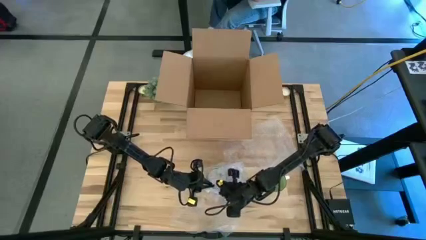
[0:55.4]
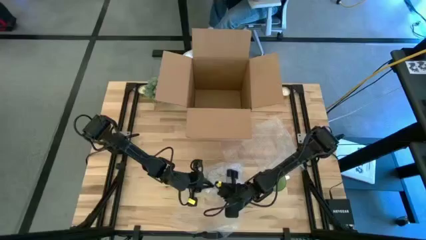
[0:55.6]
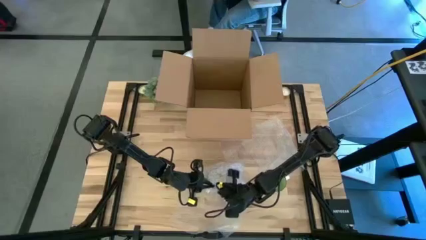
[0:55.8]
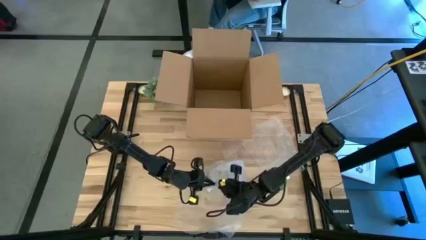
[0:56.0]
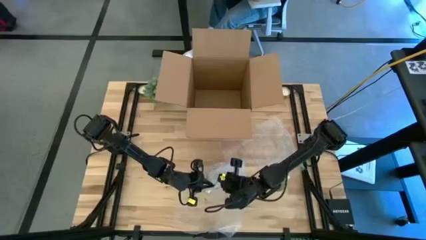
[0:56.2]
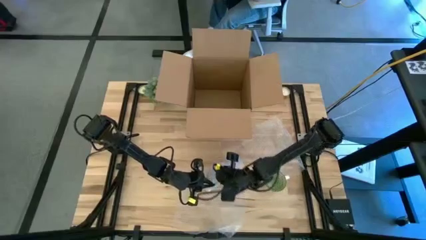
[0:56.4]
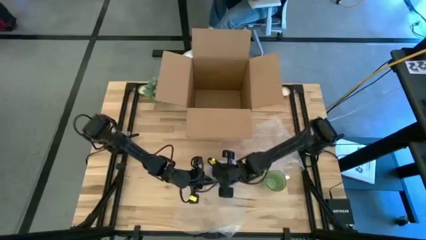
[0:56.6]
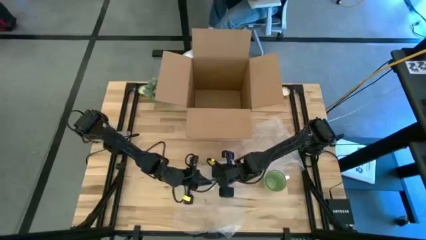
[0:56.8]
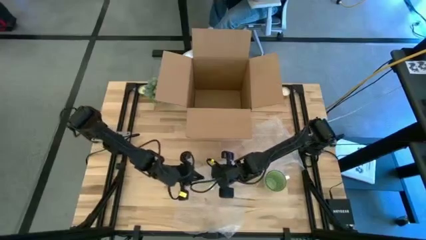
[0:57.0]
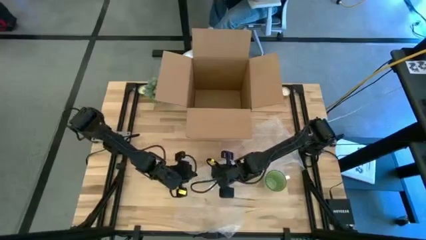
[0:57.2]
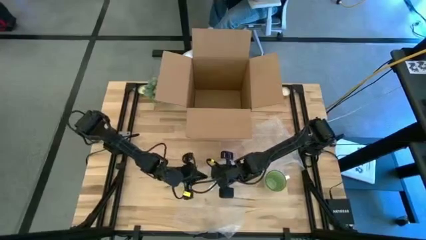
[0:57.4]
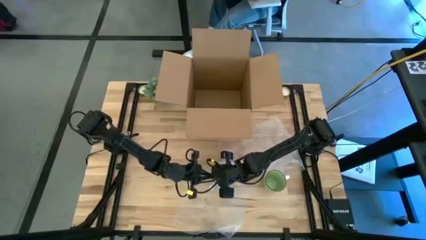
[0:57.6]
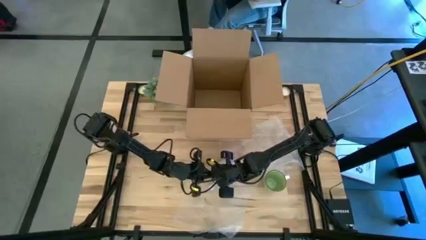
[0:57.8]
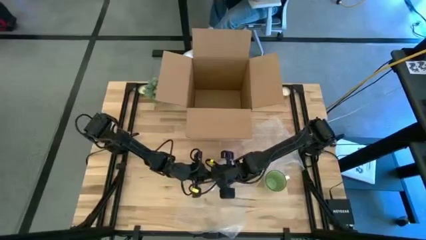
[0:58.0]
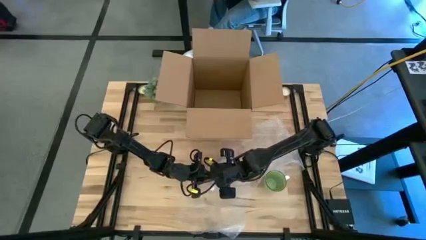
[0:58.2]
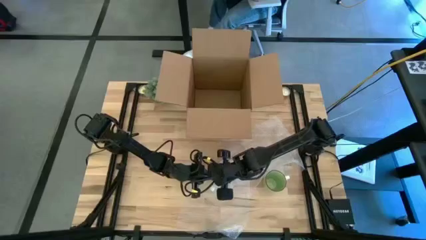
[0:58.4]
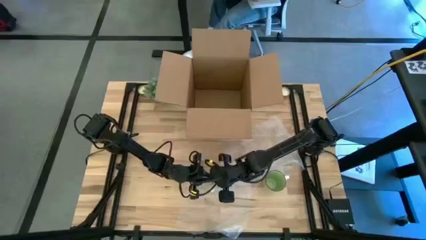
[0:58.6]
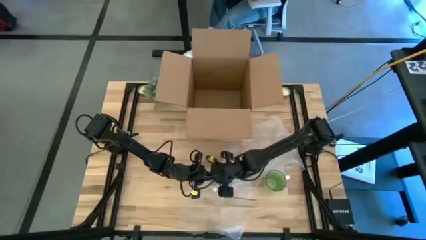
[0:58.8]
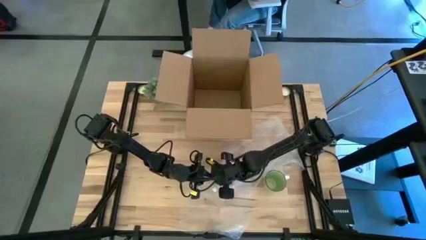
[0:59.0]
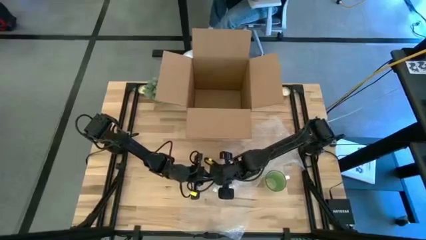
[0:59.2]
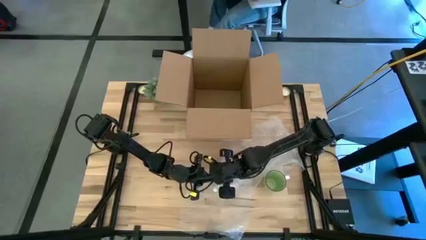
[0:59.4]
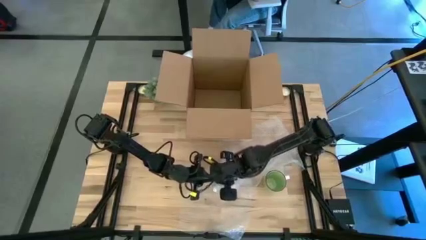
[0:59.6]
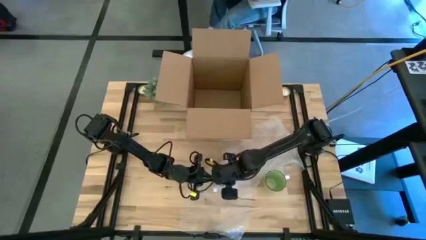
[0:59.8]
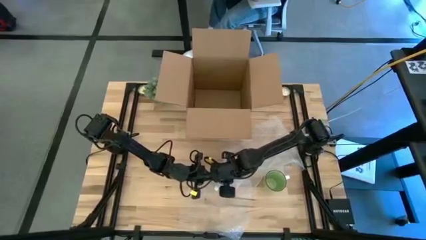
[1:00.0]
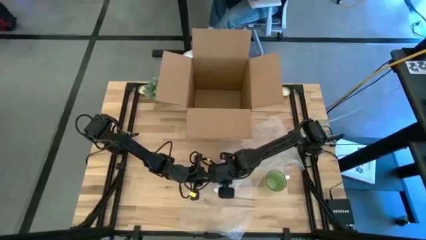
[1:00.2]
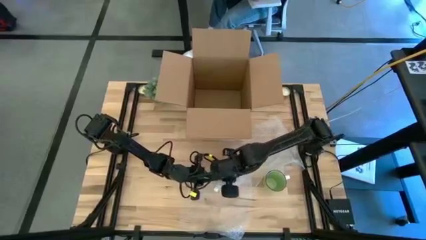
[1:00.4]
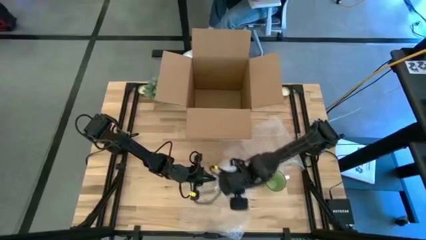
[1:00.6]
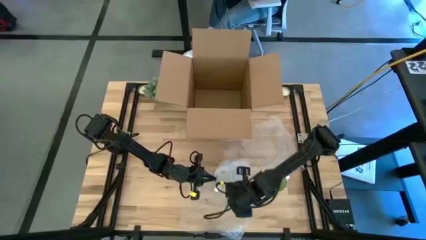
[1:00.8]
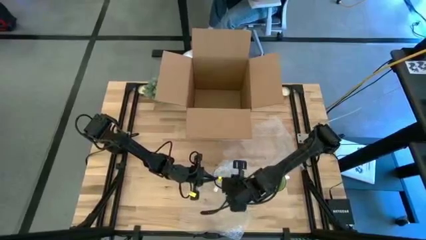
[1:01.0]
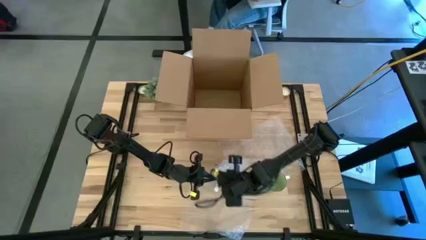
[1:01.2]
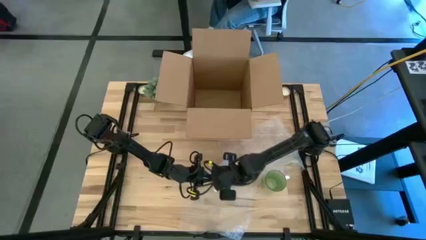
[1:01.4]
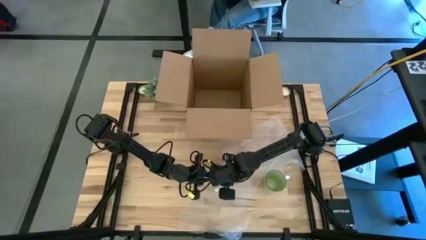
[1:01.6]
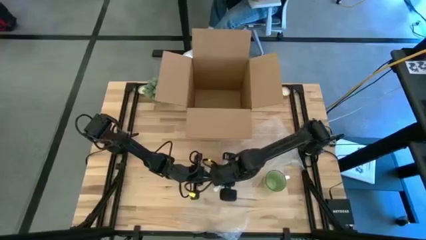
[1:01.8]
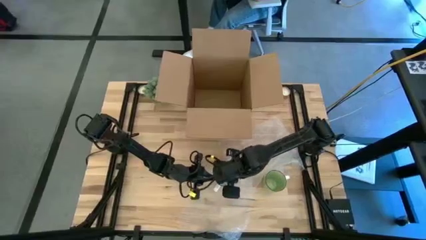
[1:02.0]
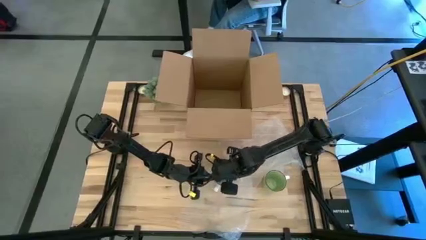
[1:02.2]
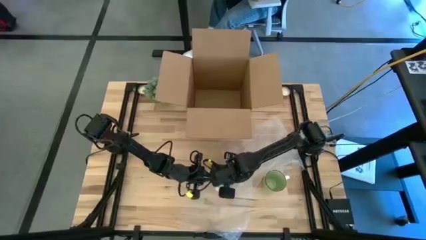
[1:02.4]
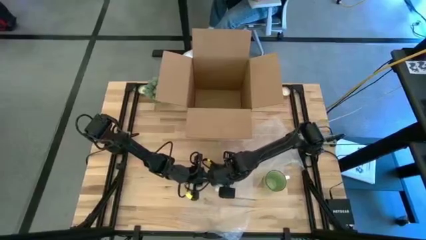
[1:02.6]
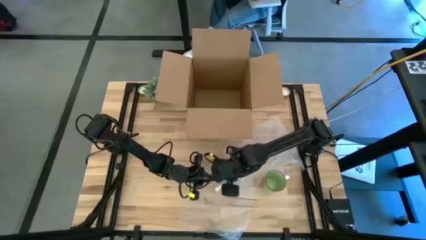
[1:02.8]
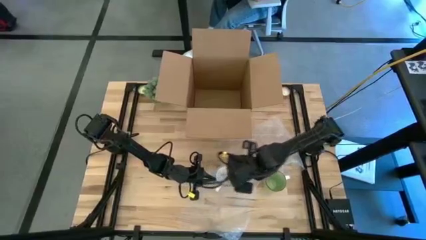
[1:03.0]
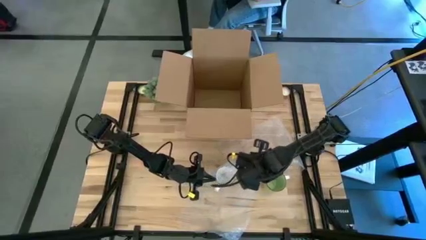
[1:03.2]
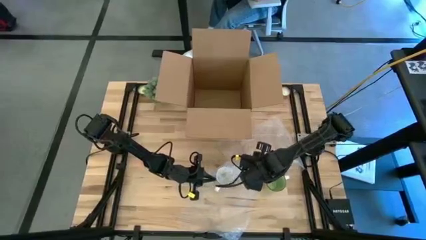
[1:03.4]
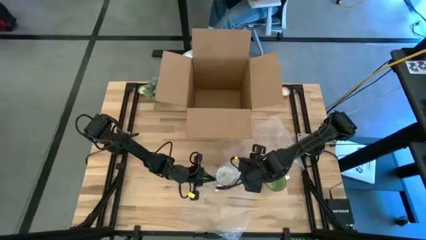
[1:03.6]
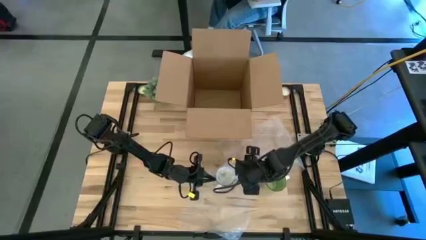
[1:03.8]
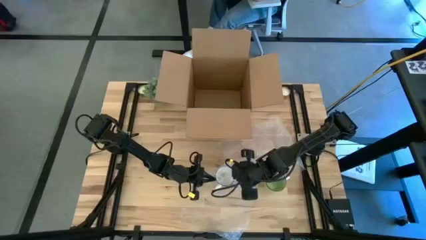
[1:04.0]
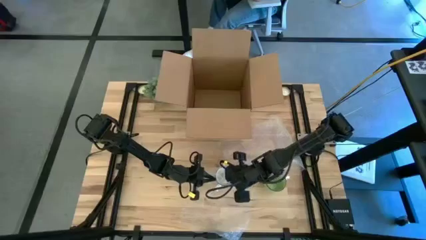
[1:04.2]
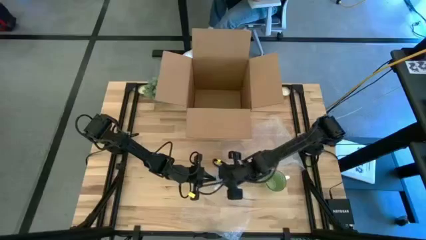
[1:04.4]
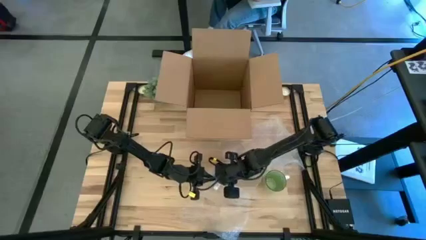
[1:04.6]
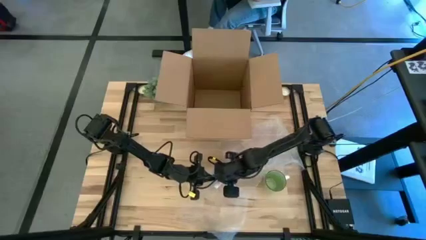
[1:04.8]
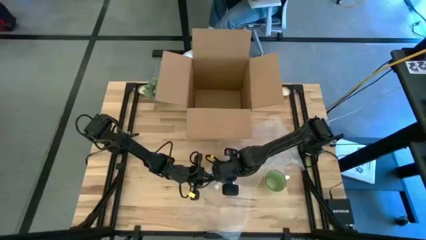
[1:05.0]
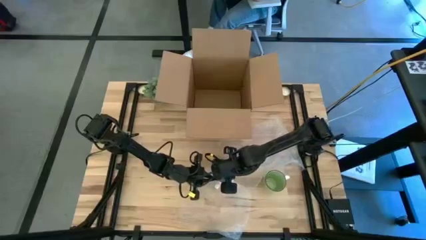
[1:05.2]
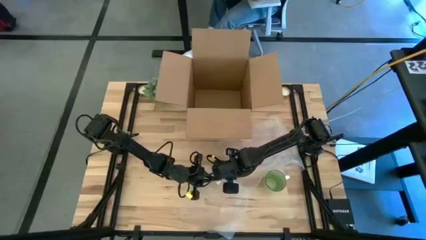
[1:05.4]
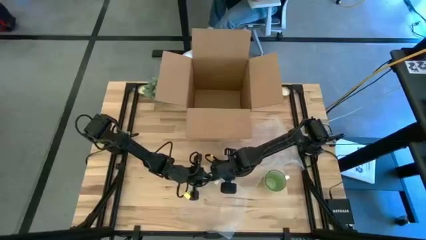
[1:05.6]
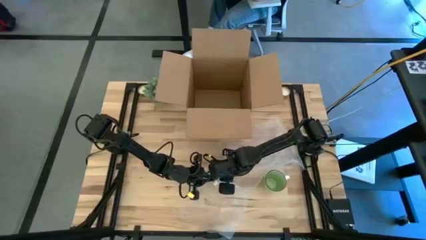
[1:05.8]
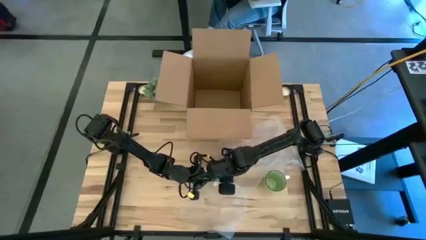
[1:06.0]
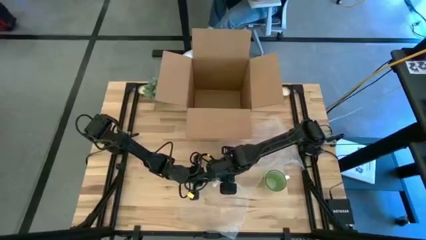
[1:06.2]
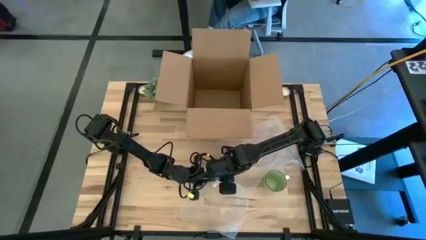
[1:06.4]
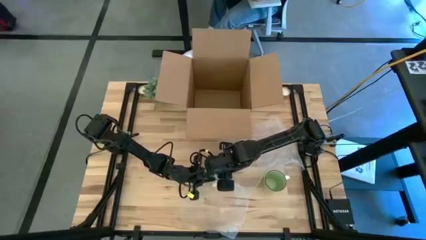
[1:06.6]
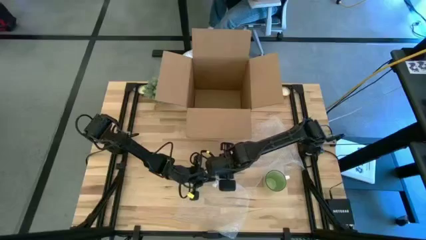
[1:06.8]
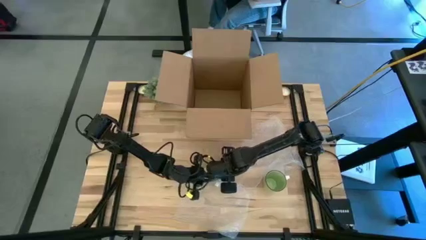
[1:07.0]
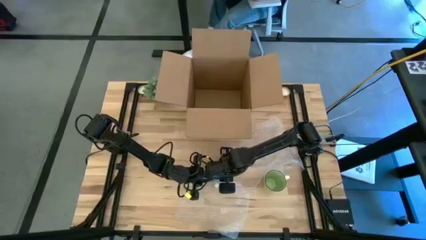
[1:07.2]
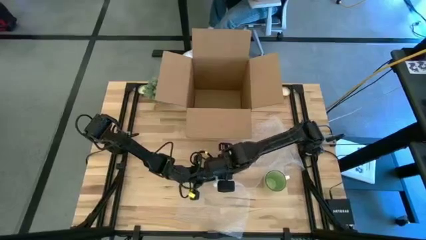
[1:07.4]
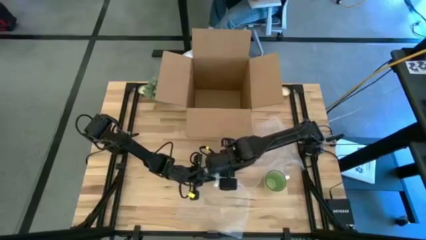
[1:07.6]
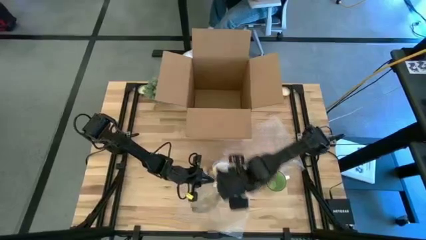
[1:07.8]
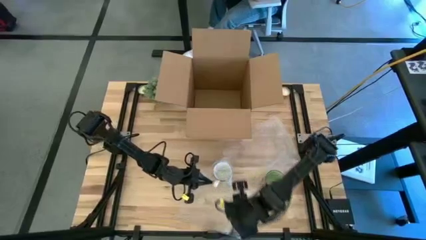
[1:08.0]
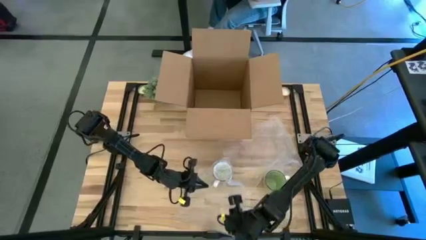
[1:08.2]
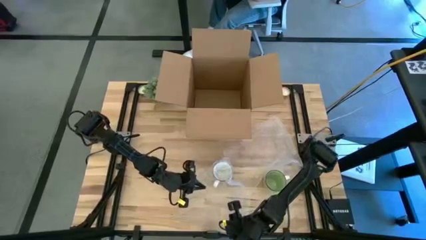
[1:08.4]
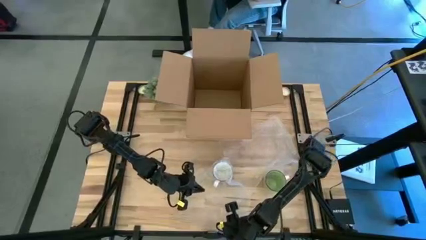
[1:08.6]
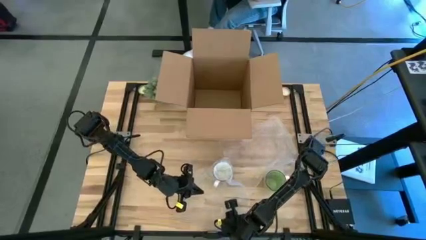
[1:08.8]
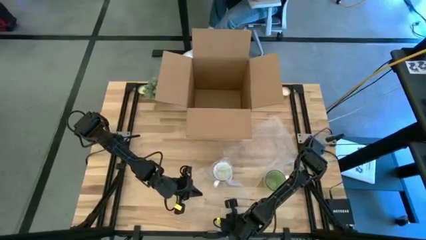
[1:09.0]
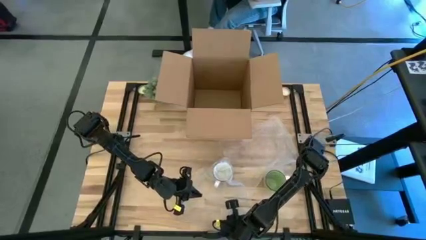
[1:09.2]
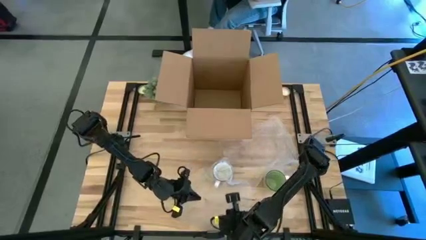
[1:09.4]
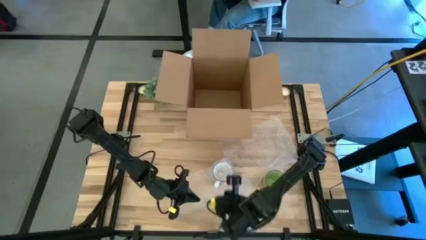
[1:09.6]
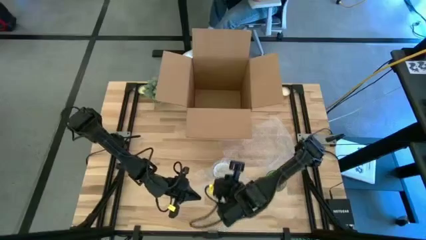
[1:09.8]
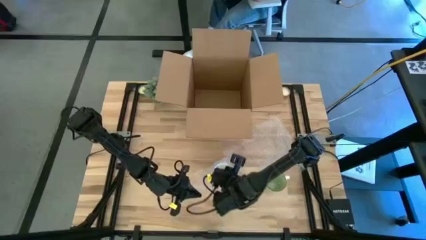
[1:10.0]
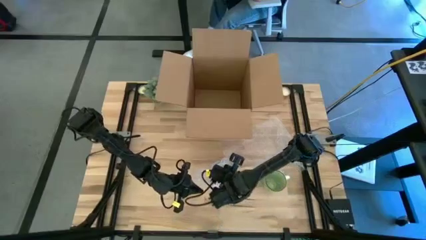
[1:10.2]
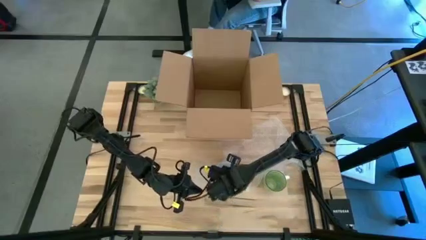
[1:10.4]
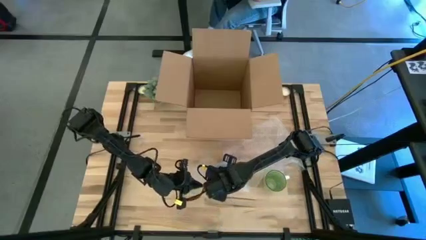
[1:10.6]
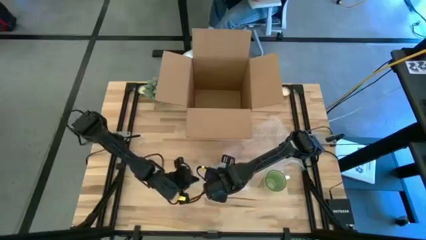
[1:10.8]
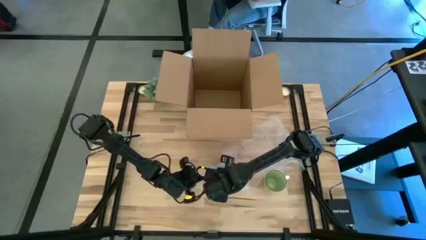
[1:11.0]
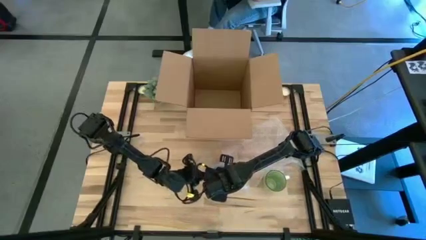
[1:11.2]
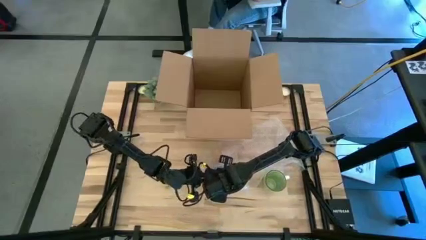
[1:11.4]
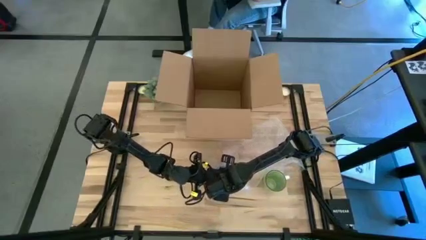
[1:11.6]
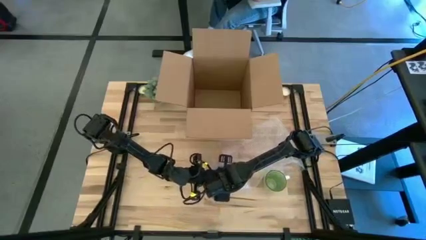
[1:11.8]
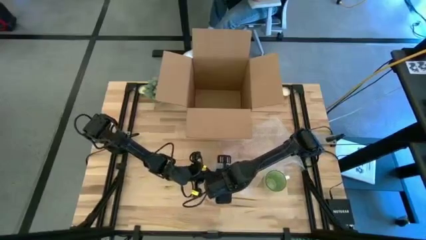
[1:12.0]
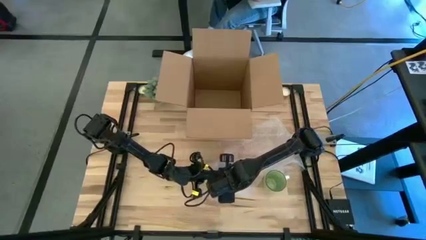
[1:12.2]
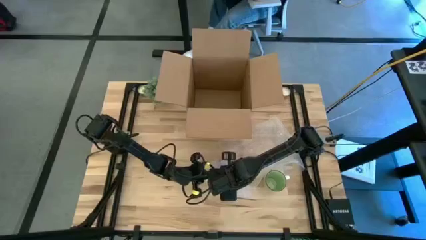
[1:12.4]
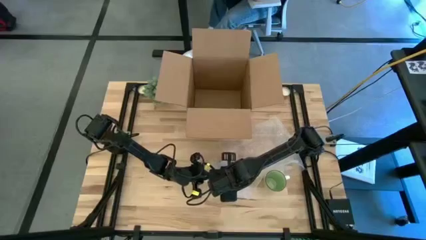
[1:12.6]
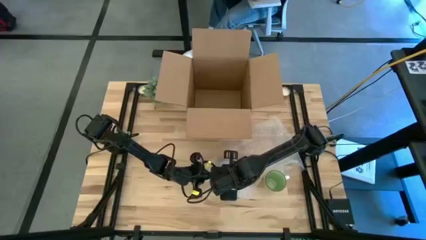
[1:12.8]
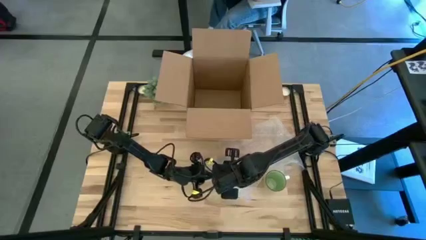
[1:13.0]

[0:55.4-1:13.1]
Task: wrap mug
Wrap the white mug with bubble wrap
